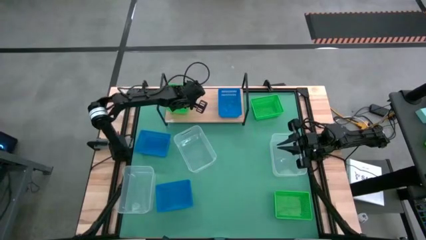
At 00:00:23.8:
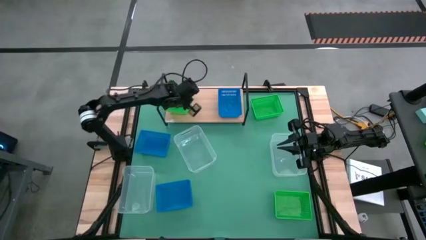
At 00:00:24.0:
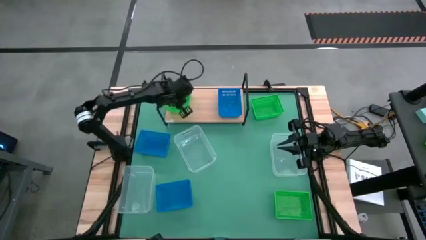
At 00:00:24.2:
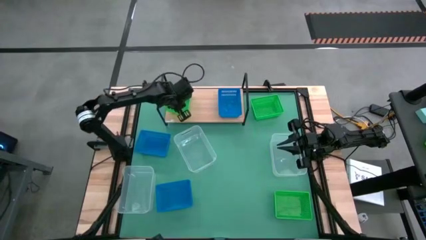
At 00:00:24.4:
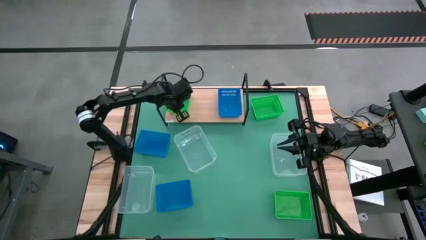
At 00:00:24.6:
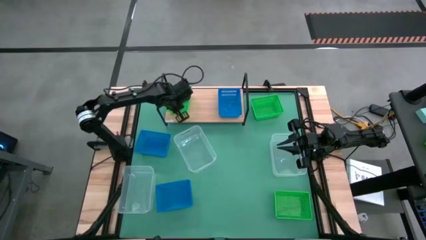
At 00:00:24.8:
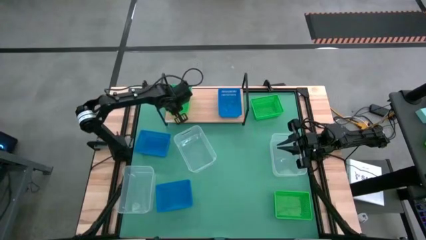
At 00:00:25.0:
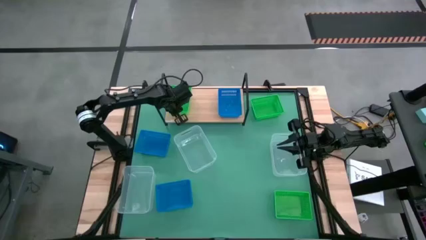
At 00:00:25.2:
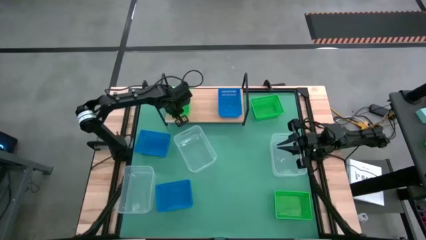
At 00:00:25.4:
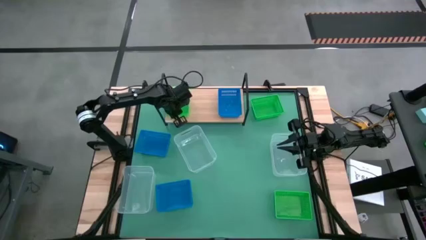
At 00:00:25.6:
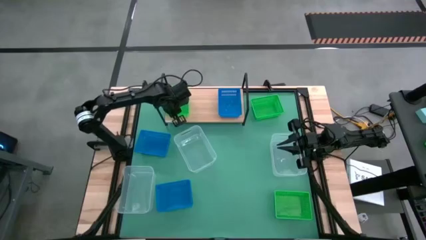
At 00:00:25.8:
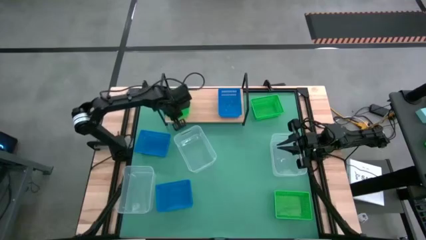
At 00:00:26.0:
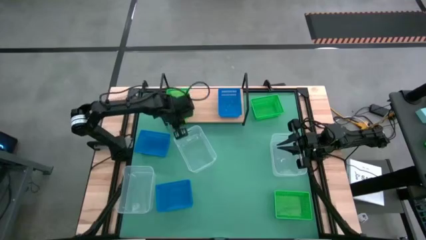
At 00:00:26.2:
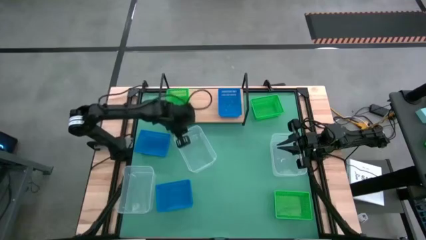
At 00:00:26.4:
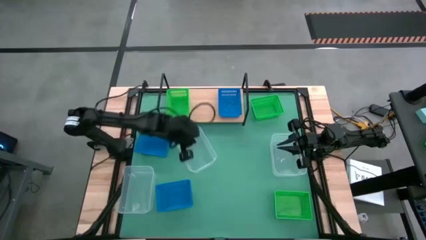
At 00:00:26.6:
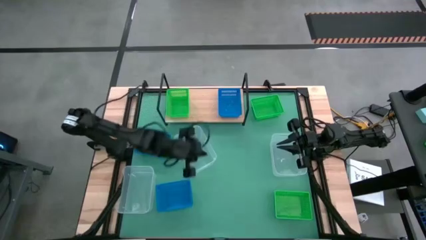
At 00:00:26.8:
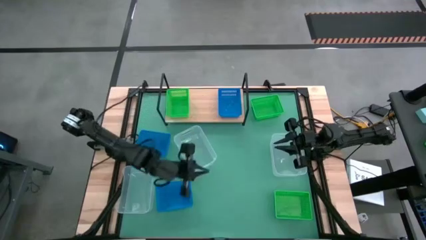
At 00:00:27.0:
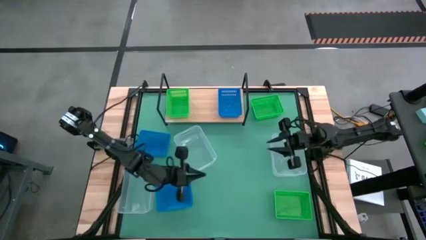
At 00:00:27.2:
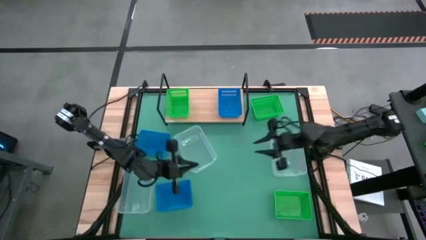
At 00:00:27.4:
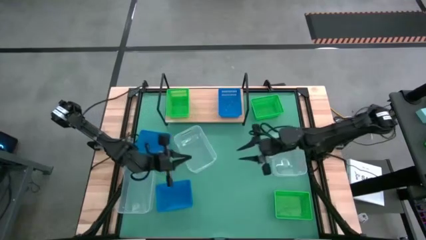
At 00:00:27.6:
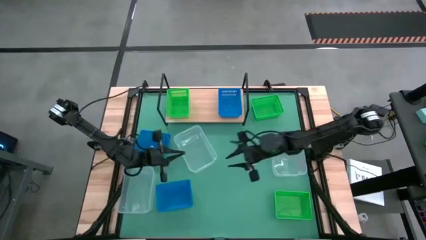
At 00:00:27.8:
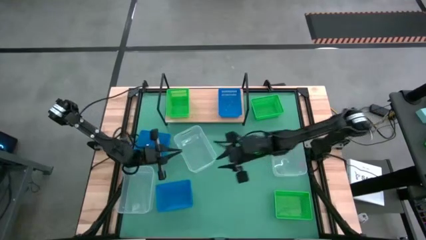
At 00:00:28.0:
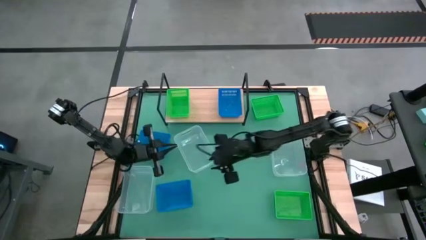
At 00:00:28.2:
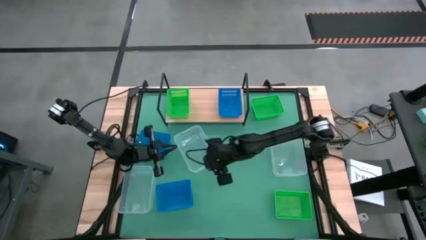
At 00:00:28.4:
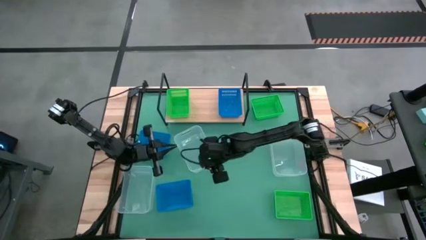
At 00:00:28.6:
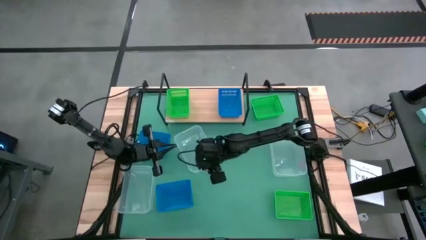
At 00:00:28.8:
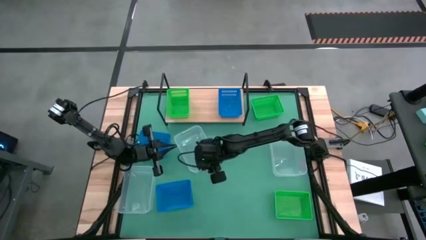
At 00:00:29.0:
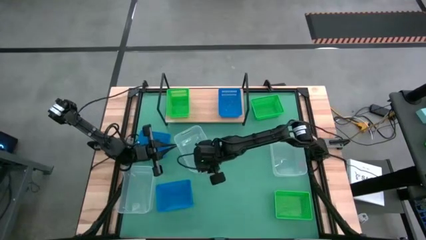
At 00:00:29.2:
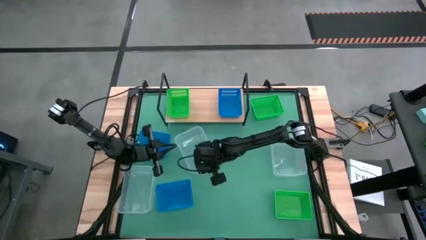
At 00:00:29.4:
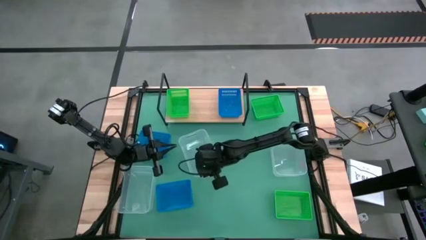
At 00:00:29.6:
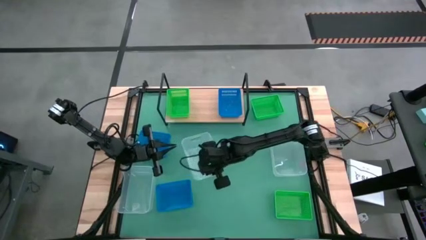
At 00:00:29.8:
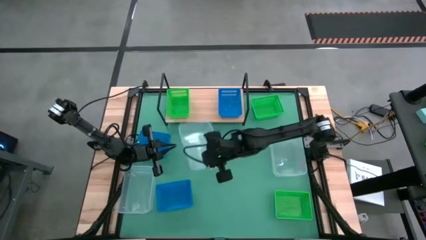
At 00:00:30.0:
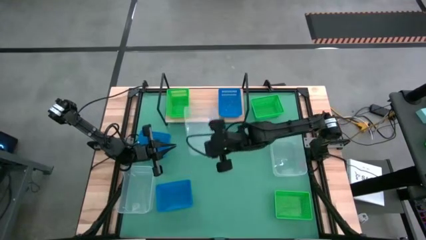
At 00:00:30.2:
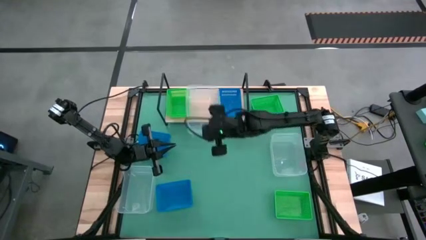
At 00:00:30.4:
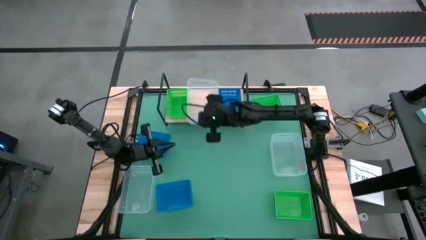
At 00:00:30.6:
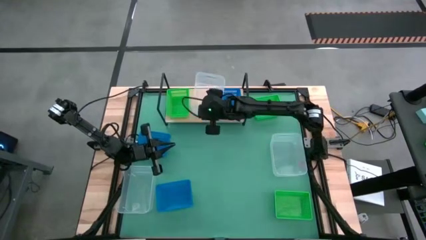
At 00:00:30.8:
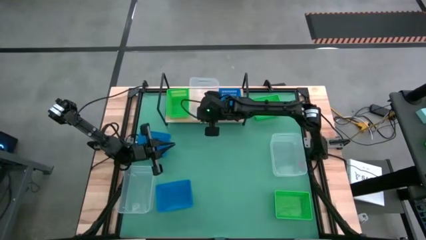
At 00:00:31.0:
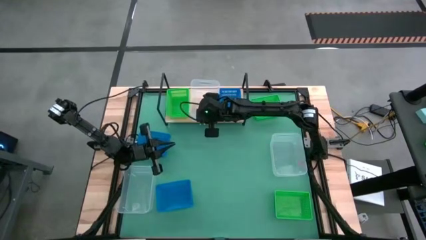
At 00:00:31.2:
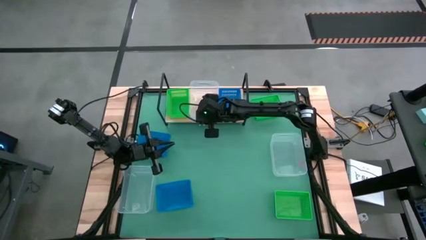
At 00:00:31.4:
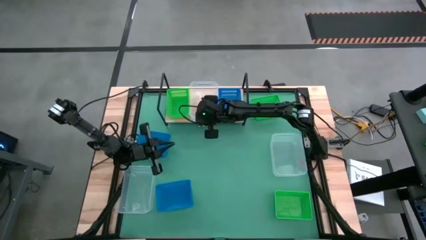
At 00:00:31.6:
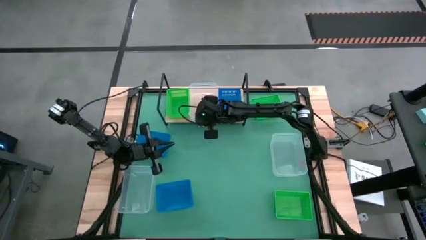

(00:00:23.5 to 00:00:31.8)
Task: Stack baskets on shelf by color
Put the middle transparent bin on the shelf

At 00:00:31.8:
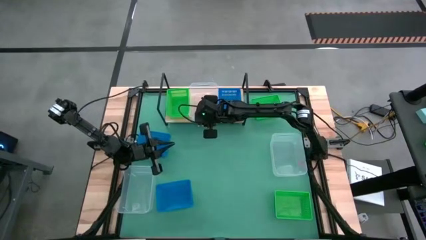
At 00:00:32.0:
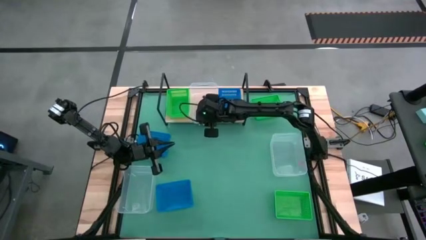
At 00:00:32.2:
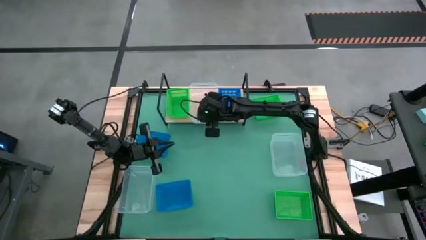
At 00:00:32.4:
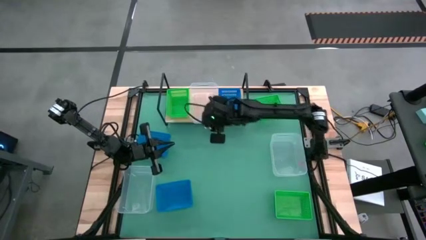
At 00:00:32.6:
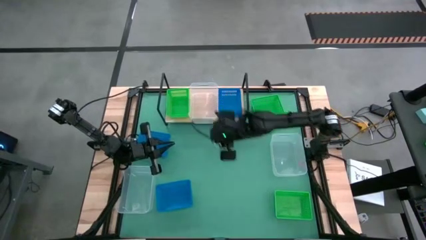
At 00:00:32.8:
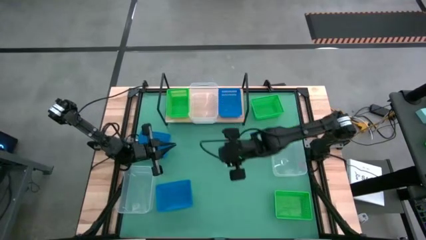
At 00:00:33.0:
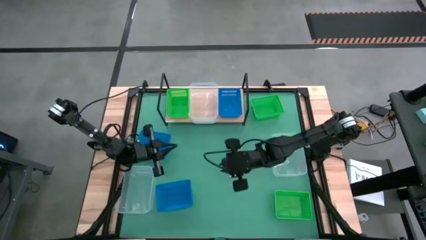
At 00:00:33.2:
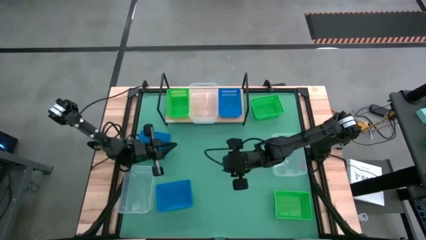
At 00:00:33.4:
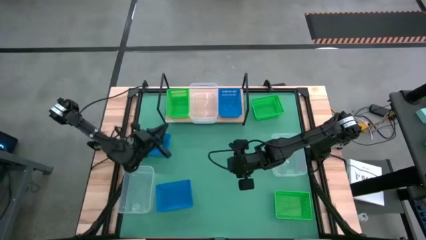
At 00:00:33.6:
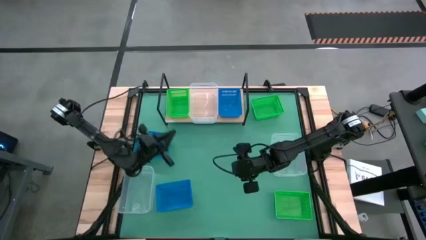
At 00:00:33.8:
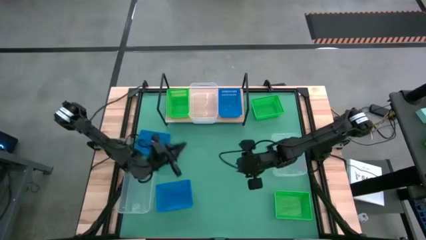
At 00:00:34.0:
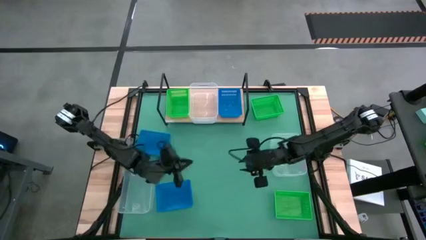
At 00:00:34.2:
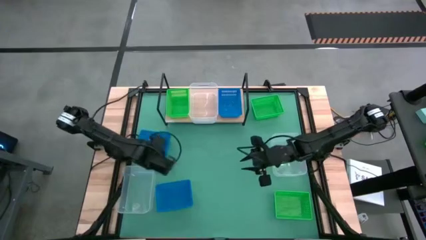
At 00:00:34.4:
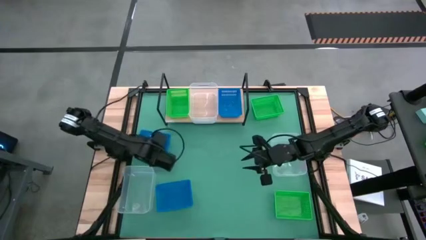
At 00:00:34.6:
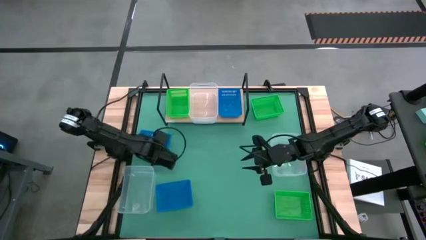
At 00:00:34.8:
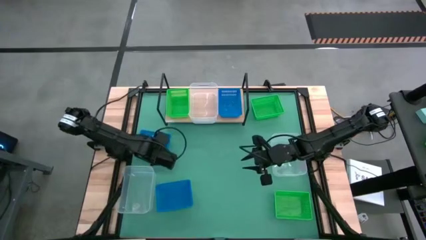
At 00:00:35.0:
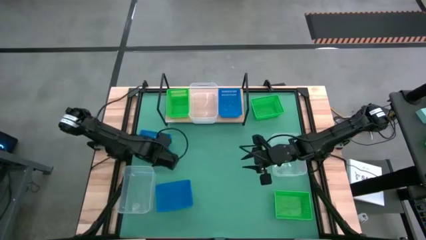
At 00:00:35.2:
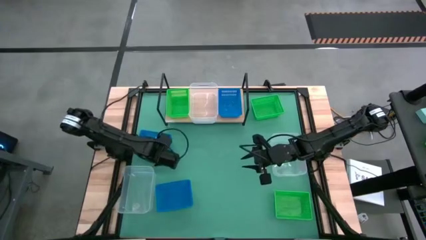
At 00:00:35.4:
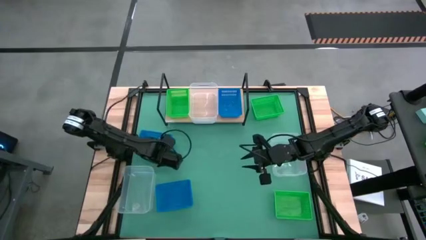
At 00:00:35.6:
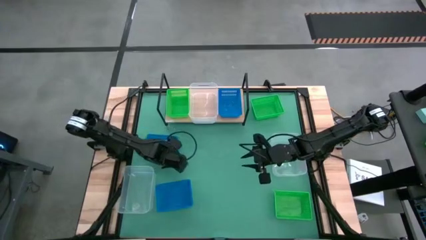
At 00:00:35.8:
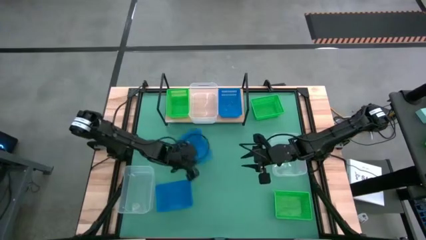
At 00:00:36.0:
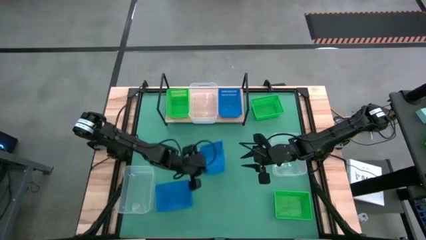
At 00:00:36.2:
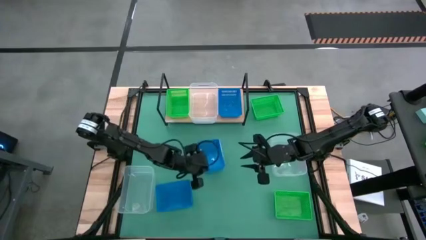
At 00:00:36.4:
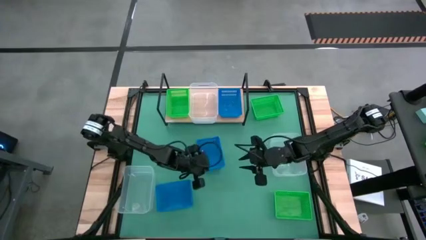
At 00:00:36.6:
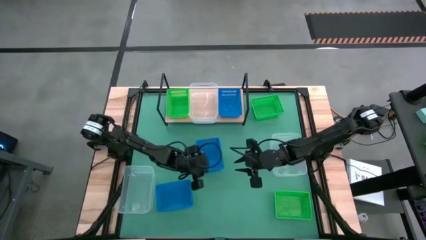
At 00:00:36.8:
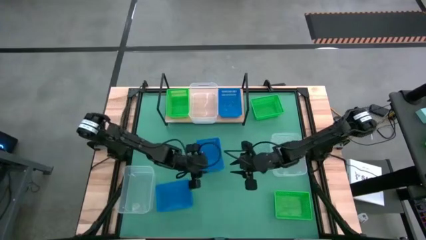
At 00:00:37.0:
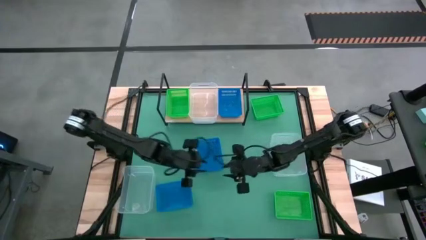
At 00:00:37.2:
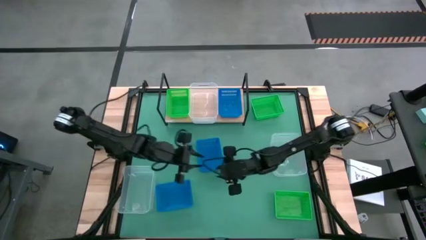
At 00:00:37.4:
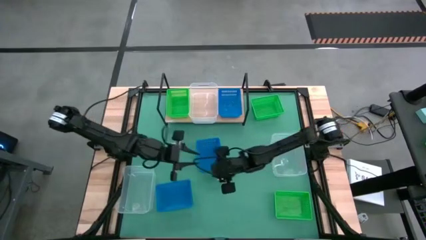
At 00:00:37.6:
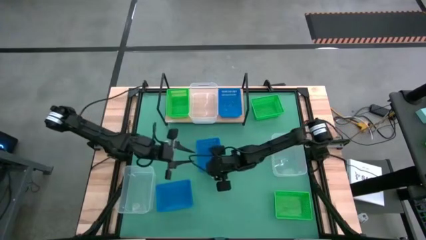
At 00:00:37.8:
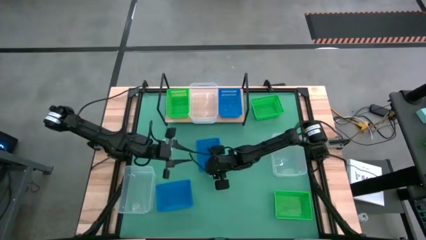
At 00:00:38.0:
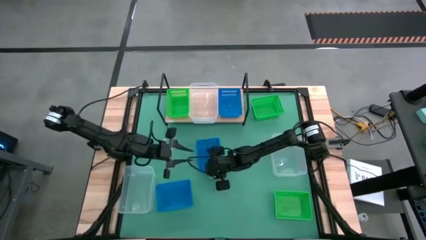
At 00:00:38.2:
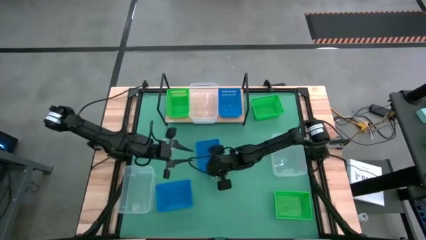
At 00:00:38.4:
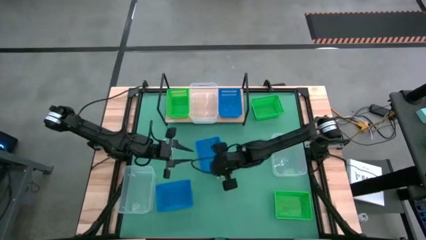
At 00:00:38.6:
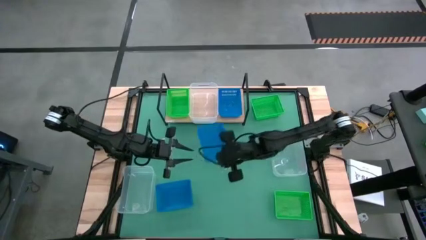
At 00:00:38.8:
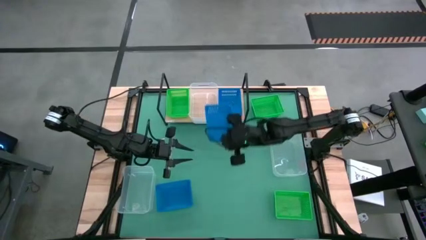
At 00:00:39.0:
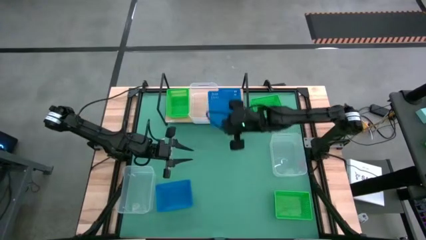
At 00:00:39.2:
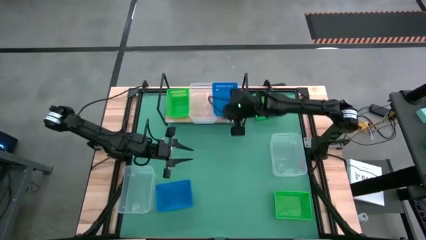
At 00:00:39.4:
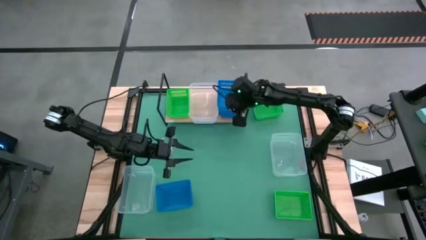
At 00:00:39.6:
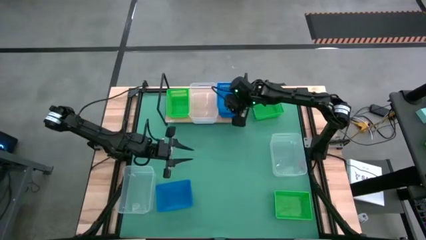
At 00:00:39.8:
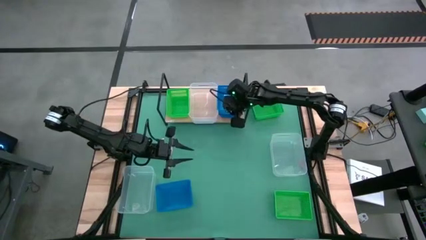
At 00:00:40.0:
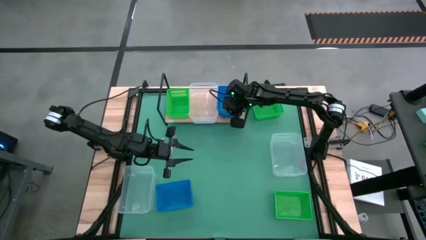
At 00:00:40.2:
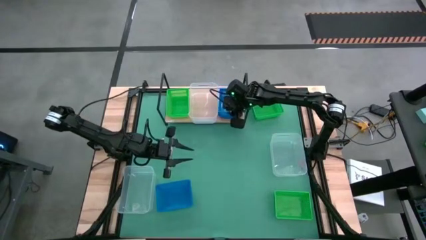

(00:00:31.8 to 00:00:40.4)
Stack the top blue bin on the blue bin on the shelf
